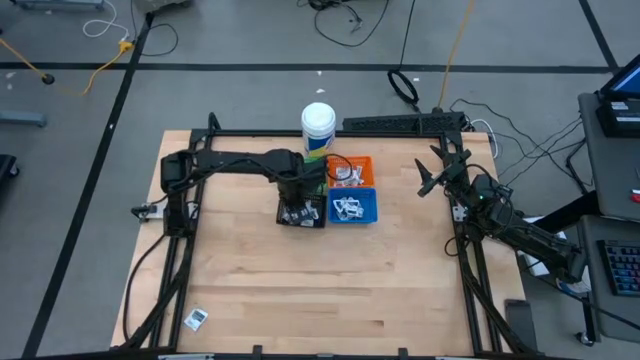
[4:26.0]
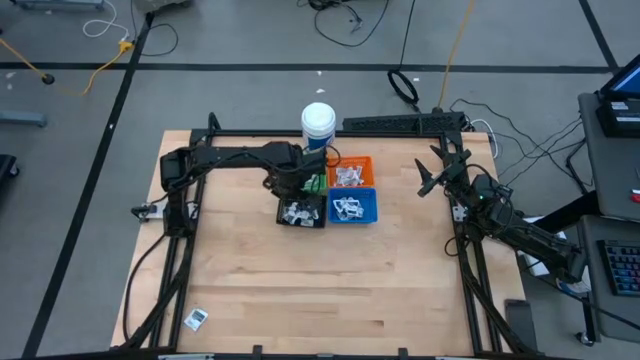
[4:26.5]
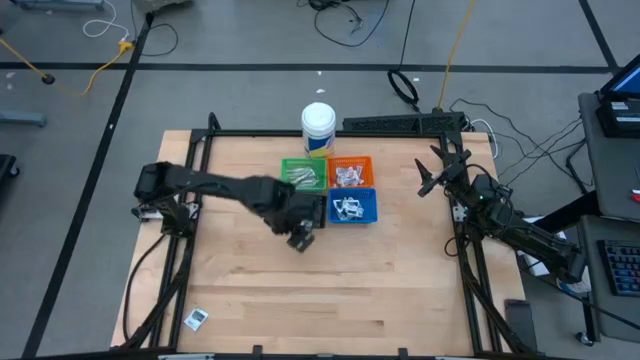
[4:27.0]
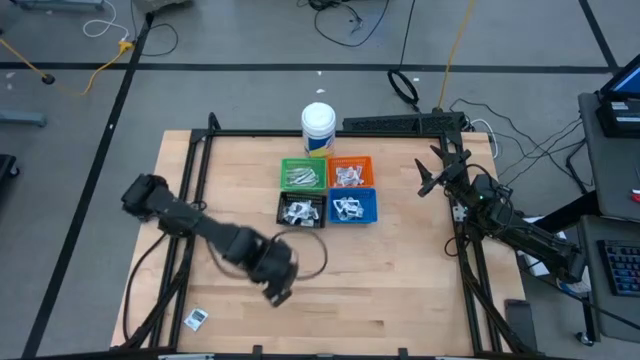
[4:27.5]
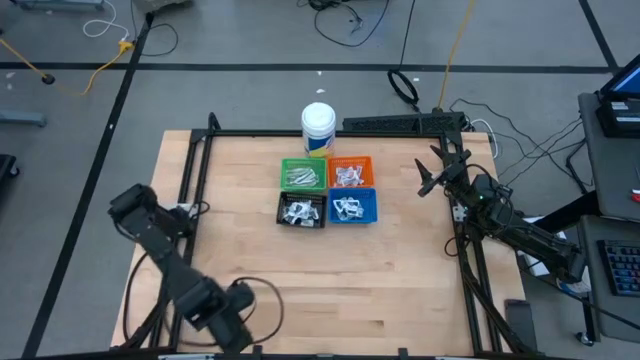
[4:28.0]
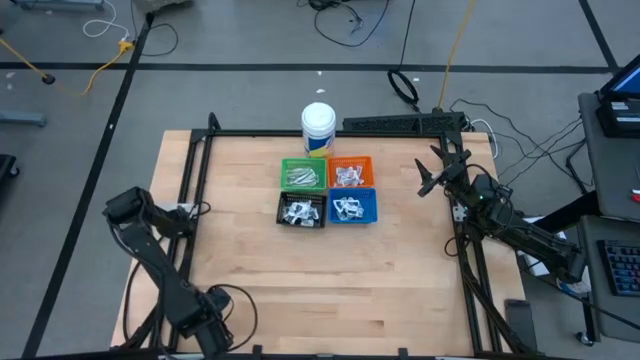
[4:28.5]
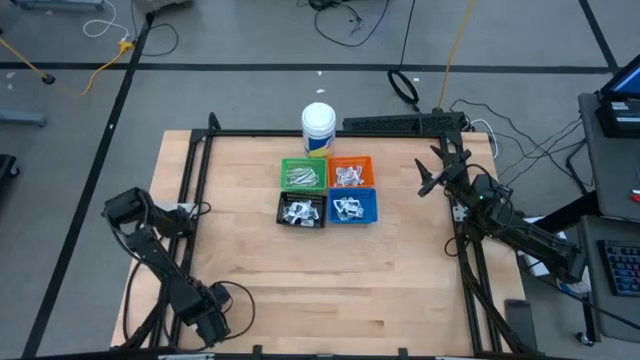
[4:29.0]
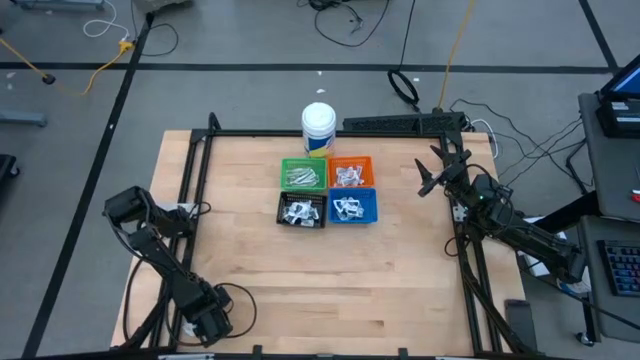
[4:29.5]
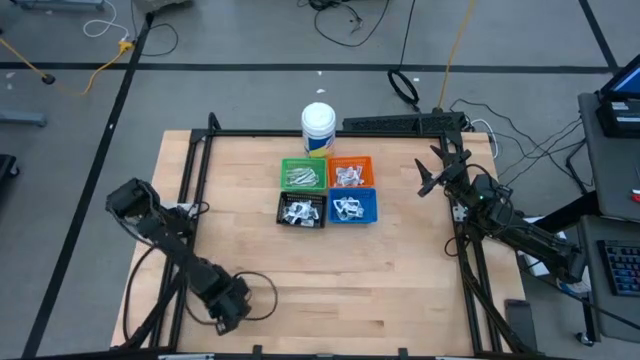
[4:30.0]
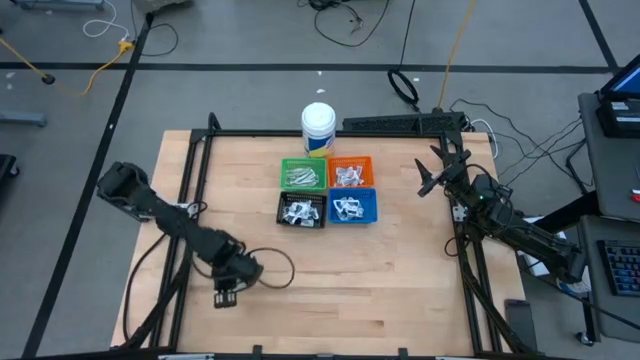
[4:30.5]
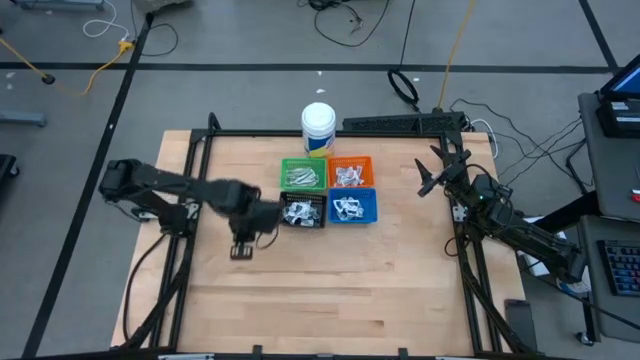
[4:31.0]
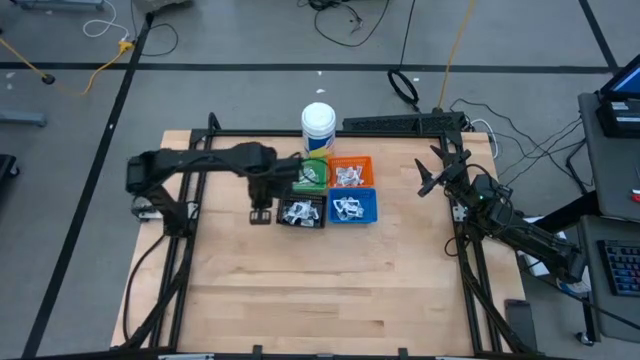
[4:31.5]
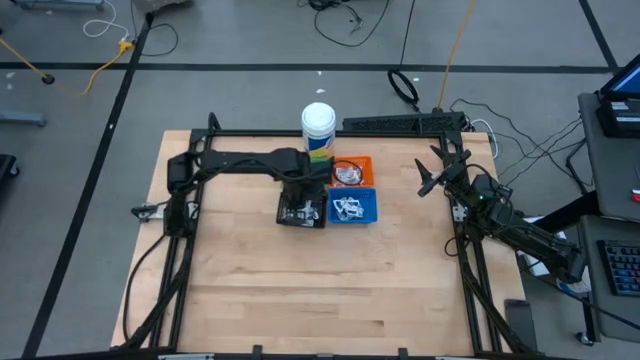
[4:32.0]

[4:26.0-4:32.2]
Task: Pick & Place First Aid Supplies
Put the black towelette pack into the black basket

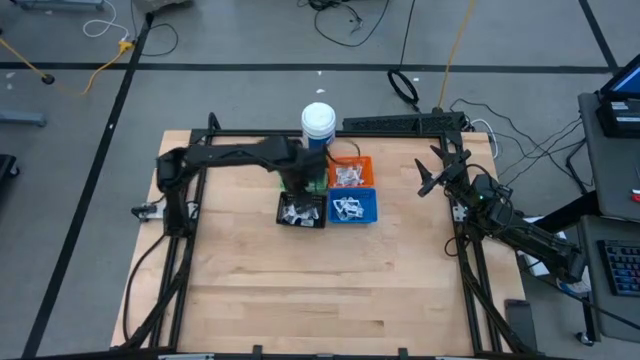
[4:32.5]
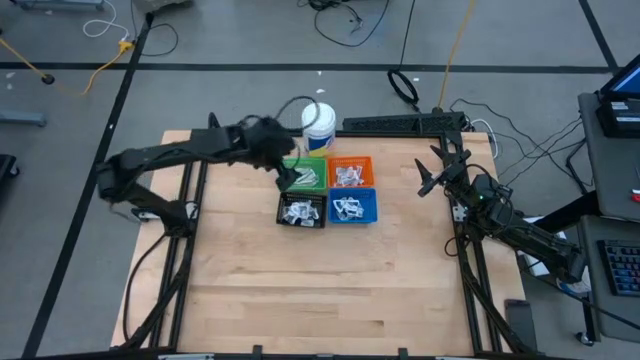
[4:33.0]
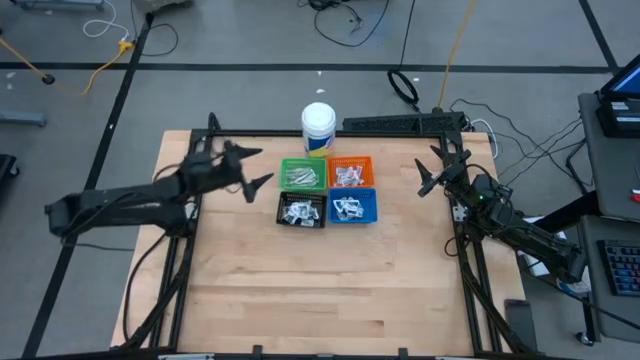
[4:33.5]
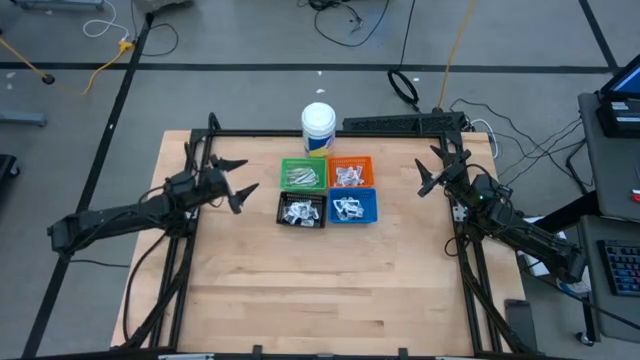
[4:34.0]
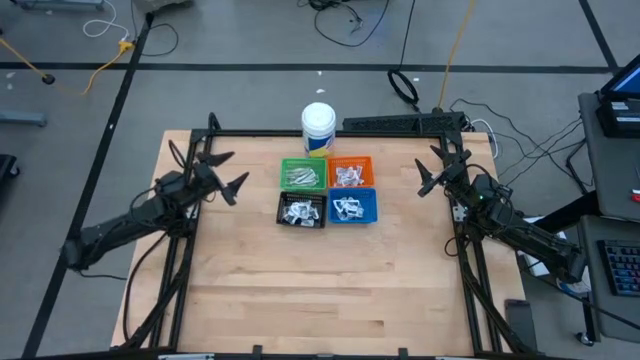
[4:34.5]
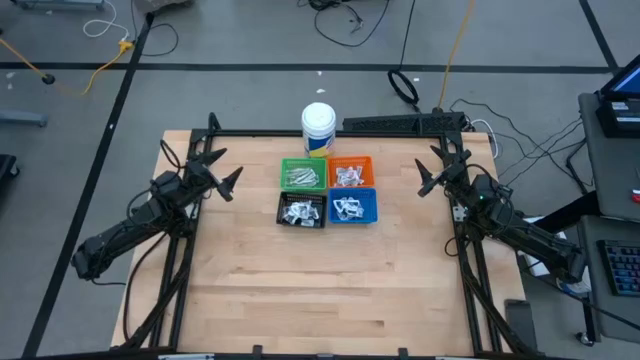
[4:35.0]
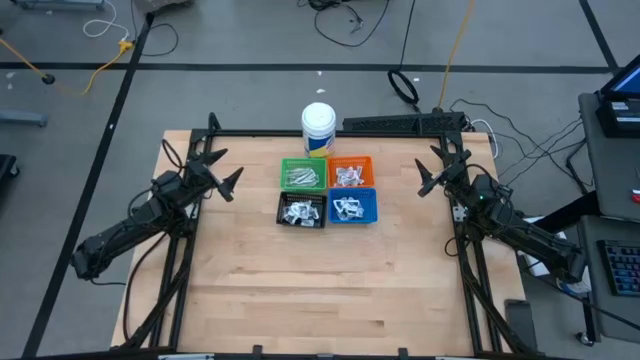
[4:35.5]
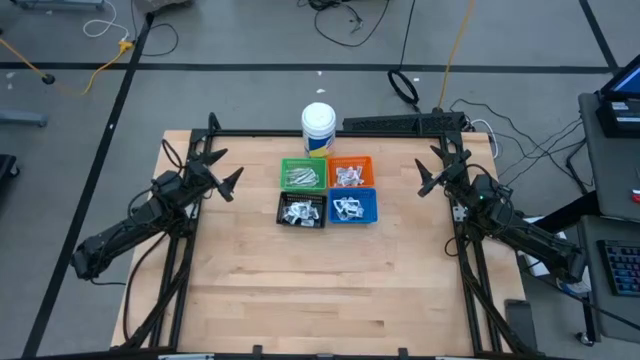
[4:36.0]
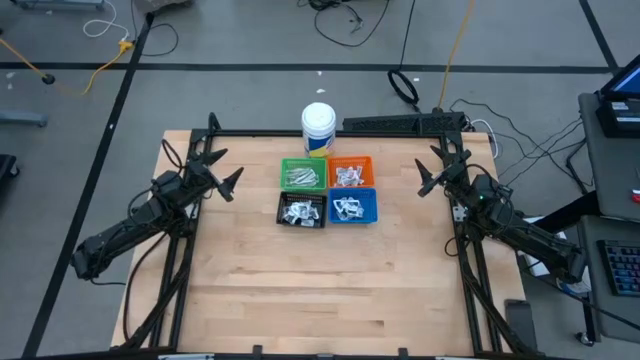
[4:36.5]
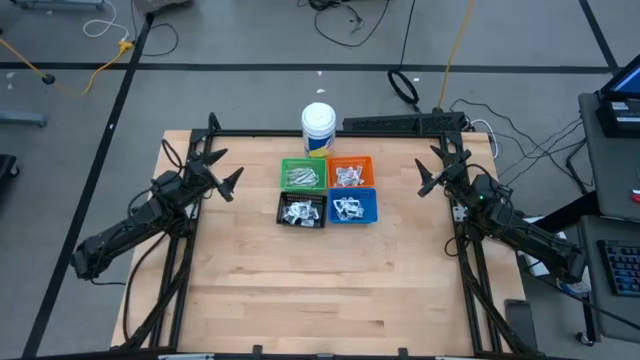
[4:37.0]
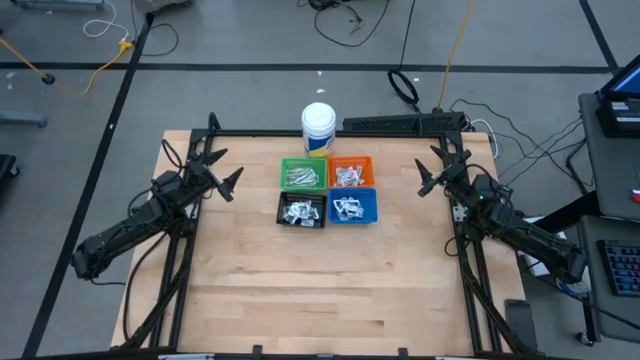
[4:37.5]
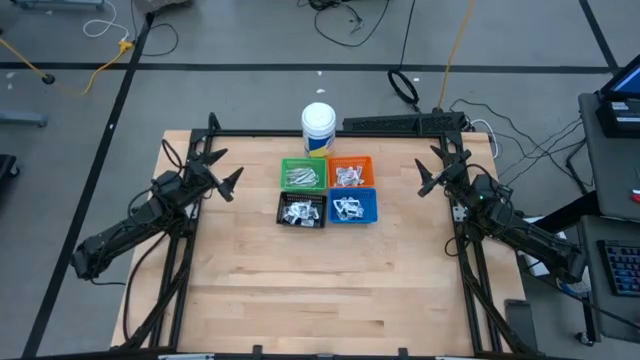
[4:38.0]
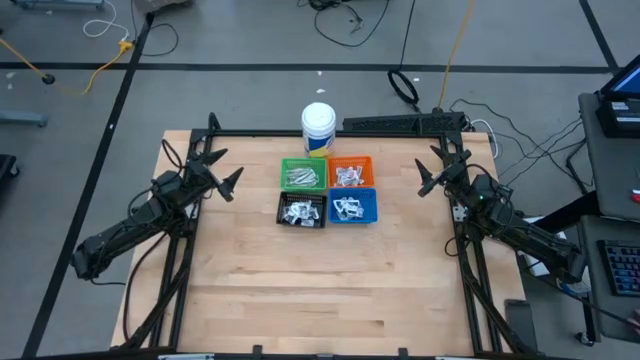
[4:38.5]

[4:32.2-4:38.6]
Return to home position

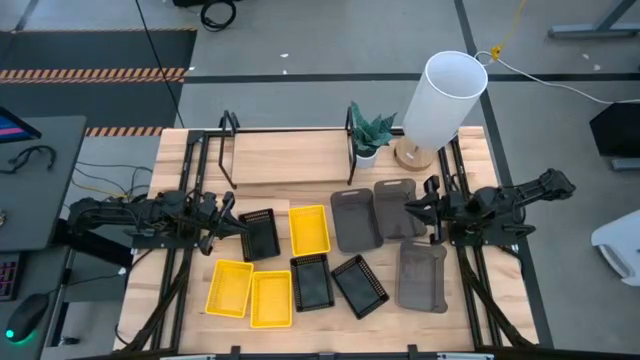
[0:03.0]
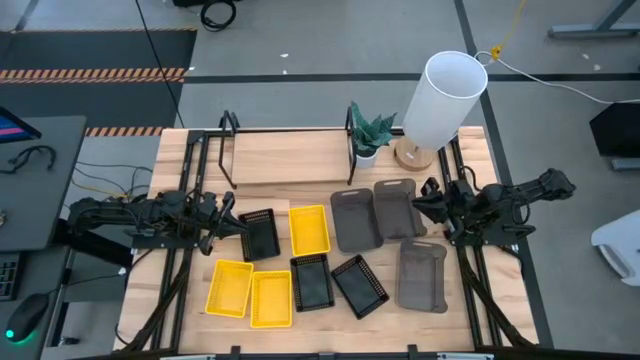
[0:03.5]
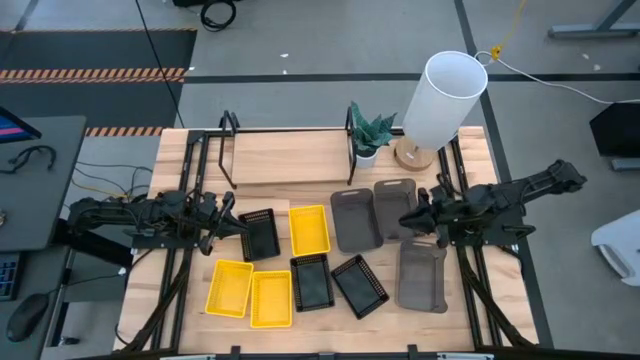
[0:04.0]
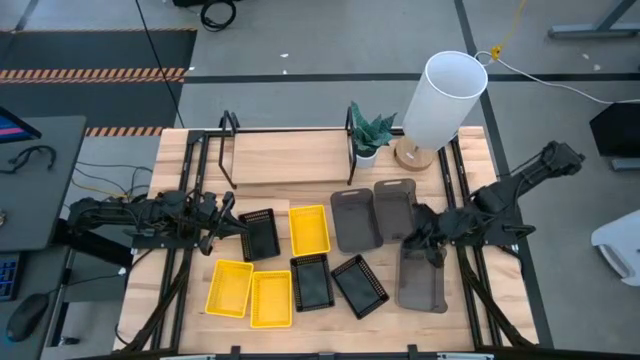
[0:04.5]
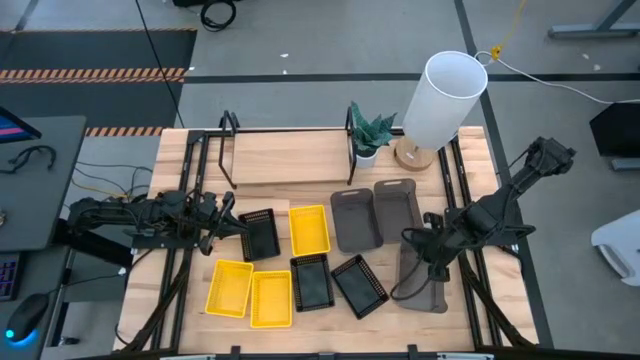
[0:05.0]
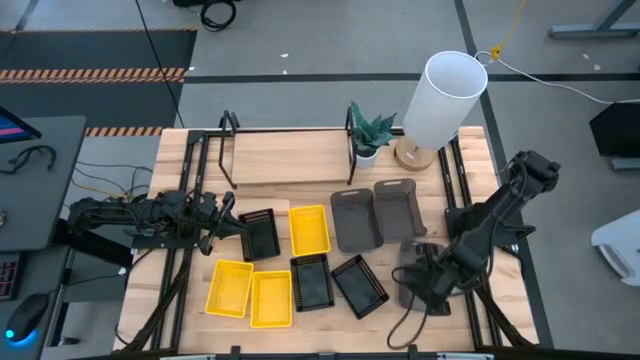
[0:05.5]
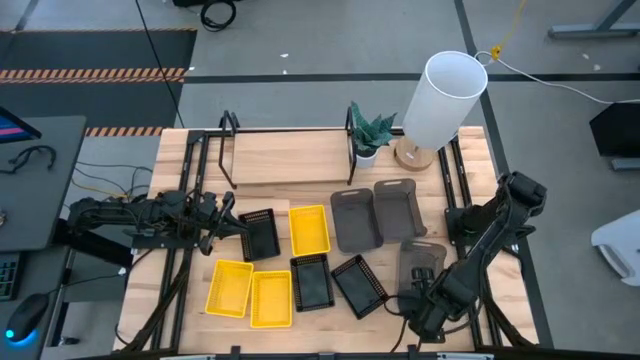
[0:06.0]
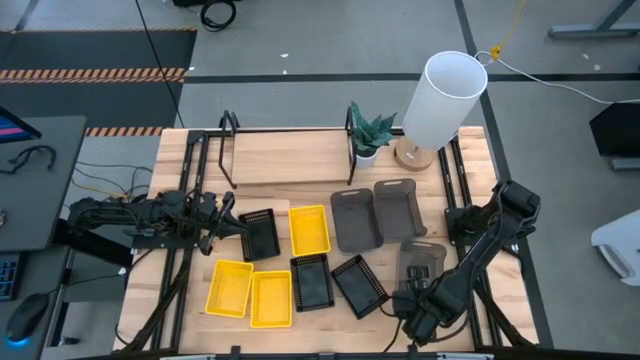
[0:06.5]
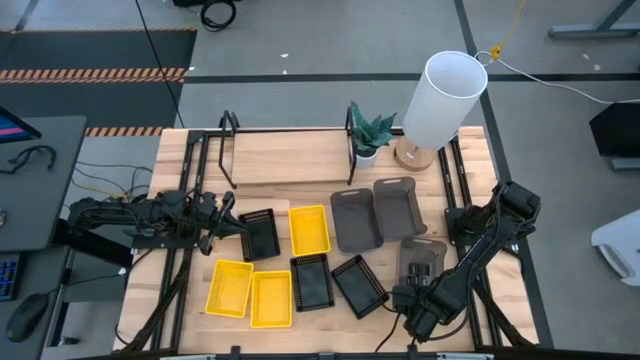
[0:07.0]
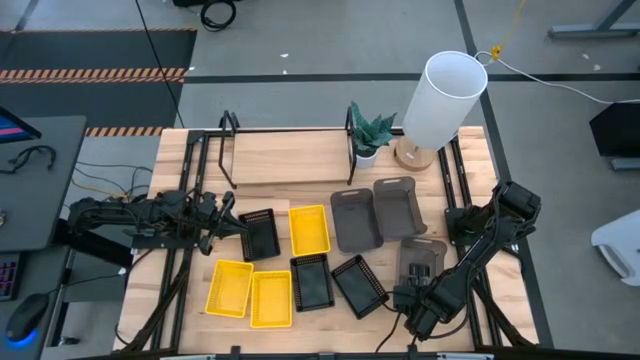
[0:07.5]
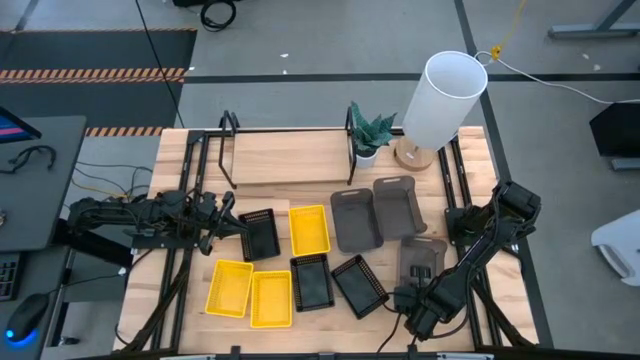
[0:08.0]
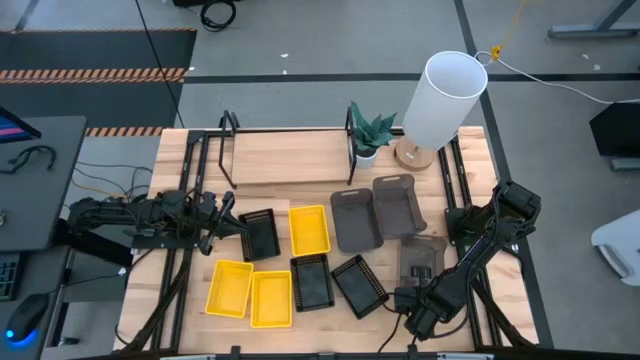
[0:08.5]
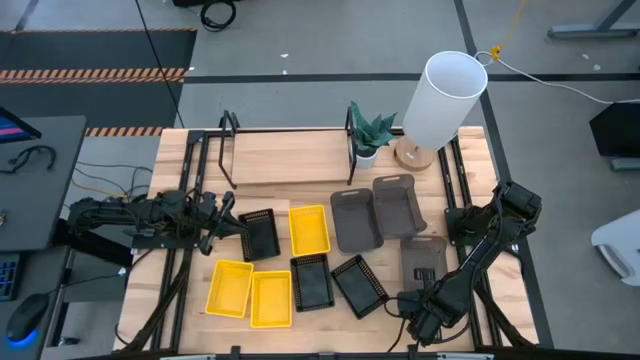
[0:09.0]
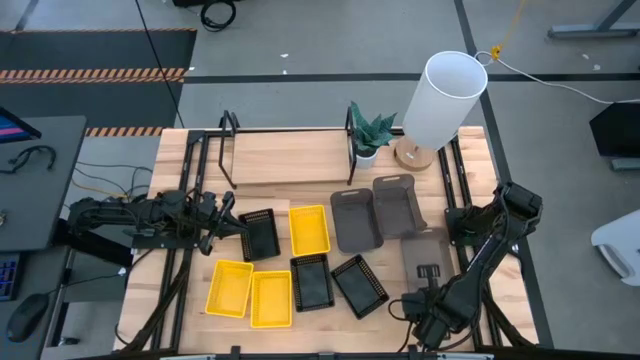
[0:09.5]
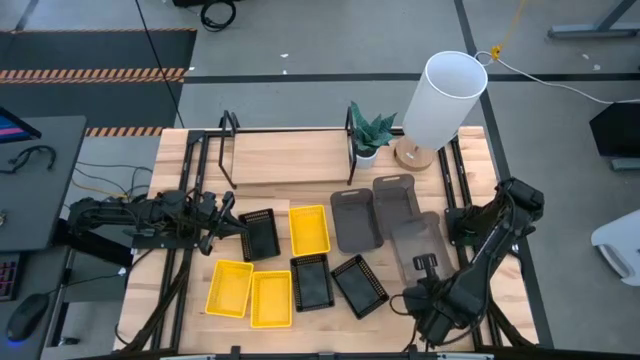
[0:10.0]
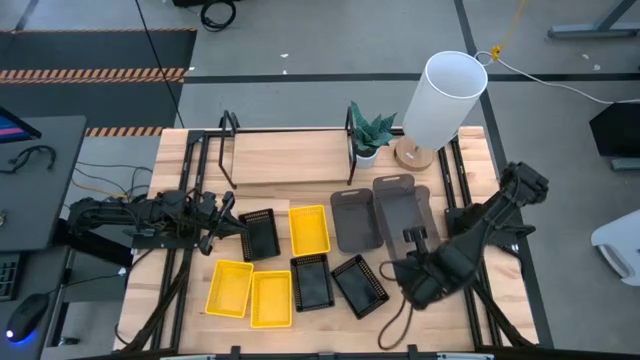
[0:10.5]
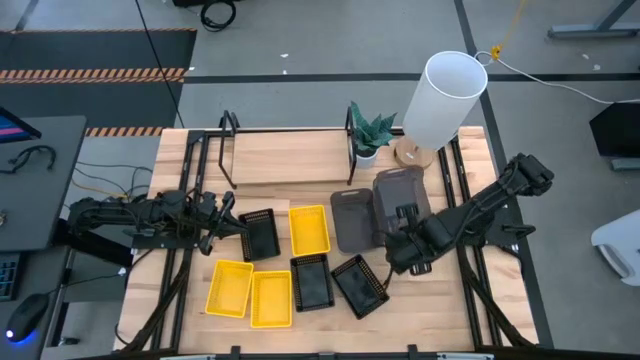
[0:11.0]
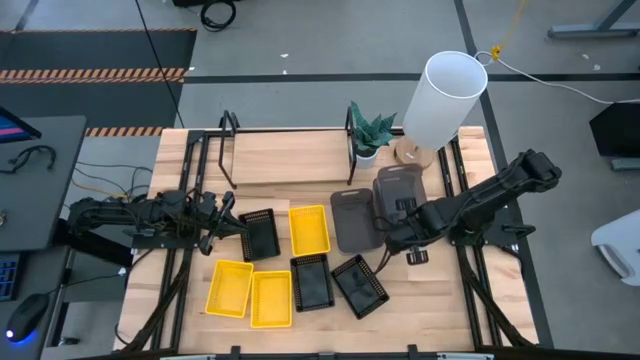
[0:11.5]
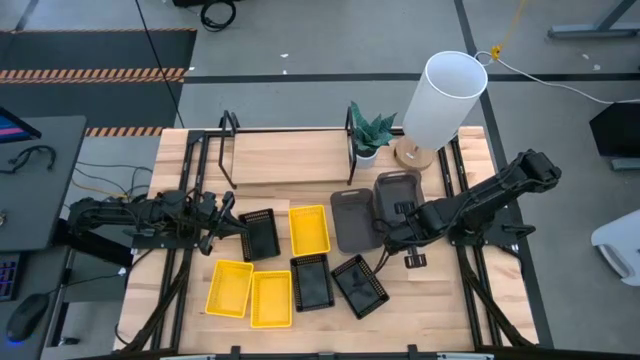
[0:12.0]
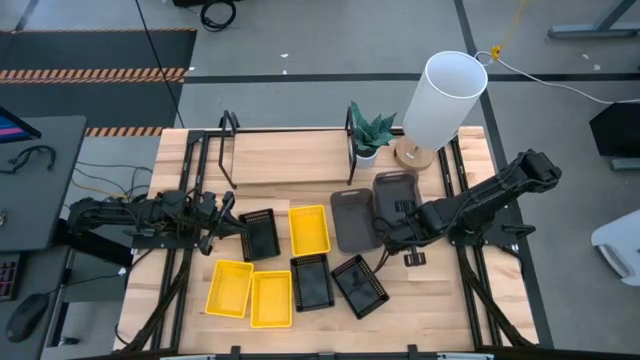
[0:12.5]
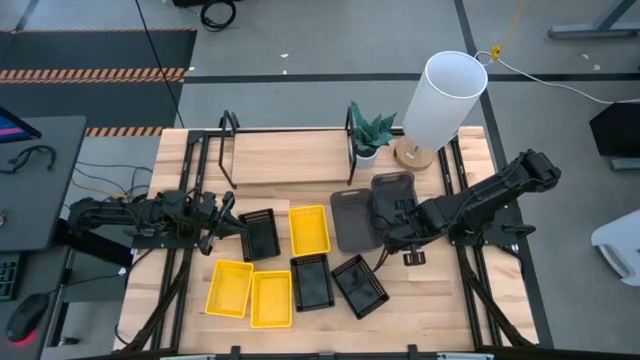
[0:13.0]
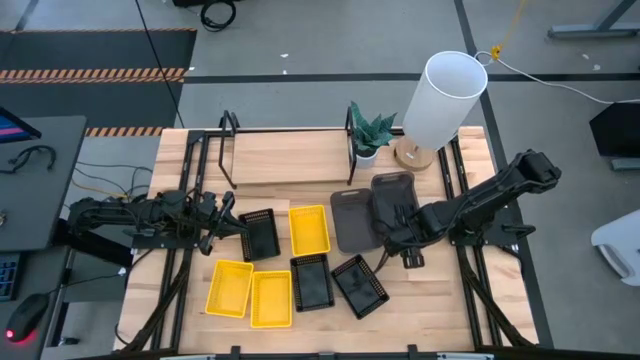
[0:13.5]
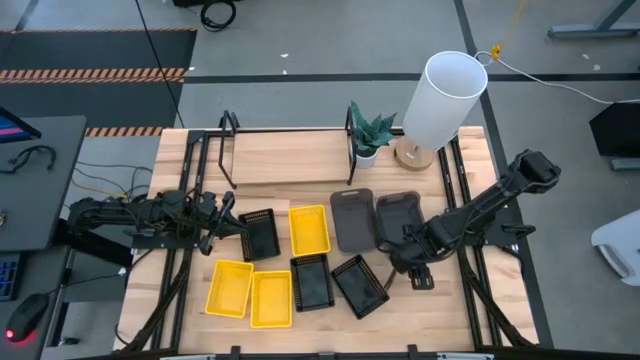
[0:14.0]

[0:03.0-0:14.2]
Task: Stack baskets on shelf by color
Stack the bottom gray bin on top of the top right gray bin
